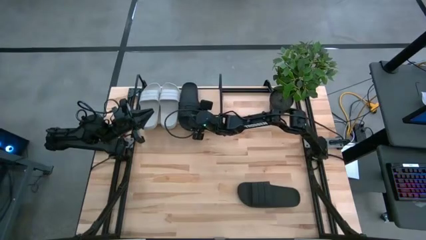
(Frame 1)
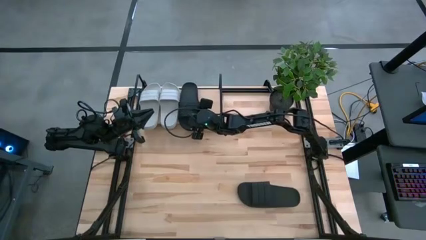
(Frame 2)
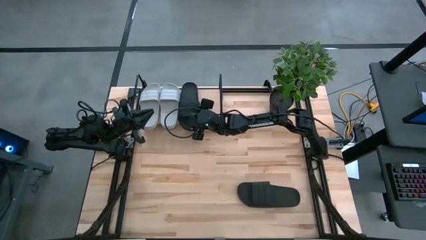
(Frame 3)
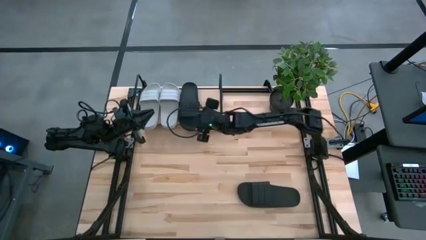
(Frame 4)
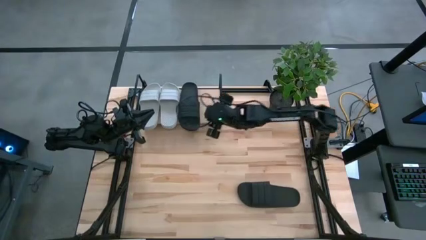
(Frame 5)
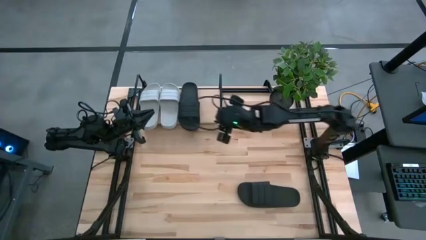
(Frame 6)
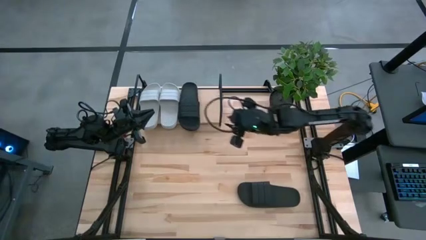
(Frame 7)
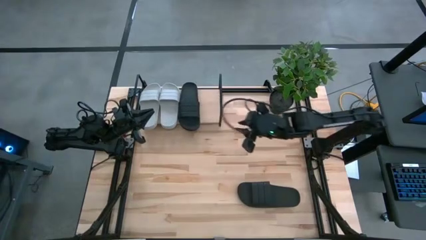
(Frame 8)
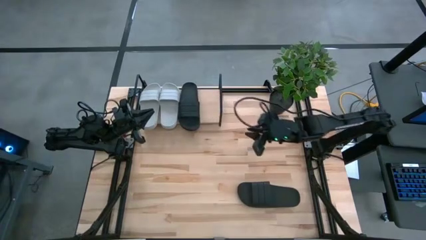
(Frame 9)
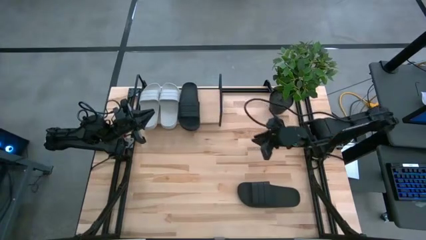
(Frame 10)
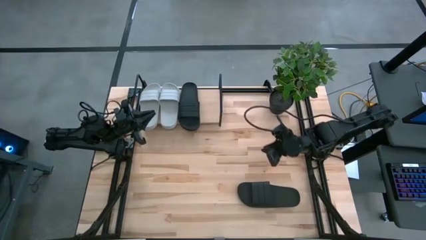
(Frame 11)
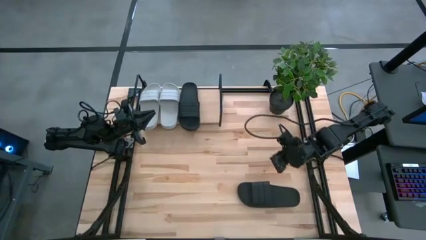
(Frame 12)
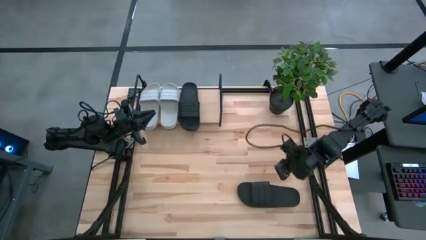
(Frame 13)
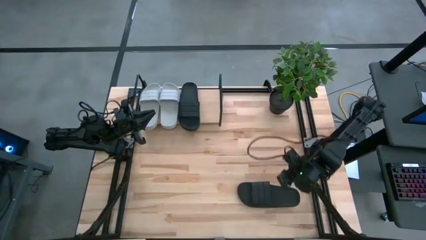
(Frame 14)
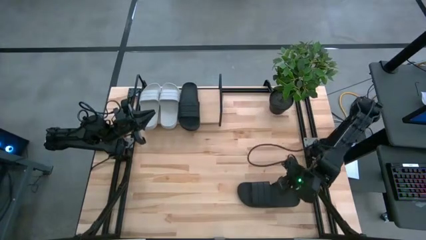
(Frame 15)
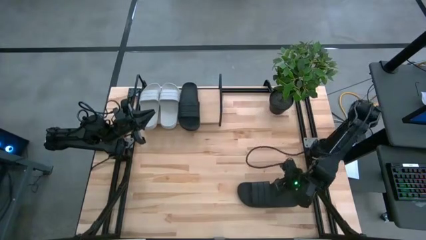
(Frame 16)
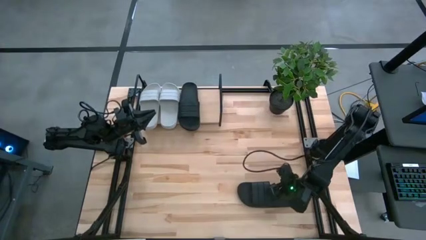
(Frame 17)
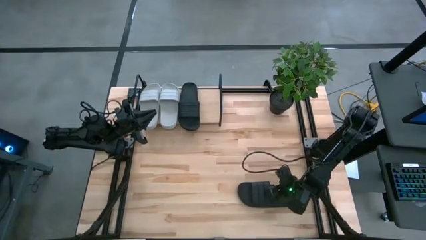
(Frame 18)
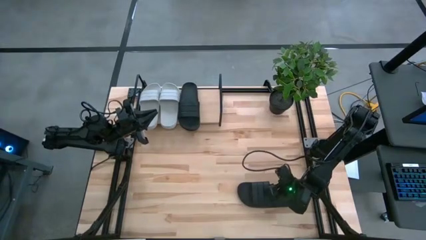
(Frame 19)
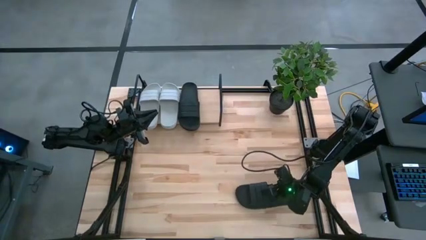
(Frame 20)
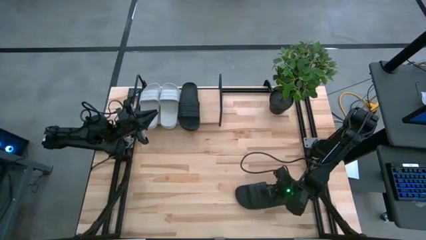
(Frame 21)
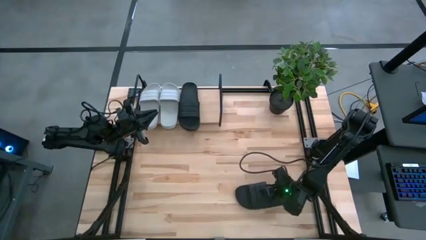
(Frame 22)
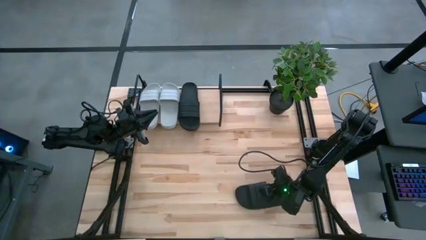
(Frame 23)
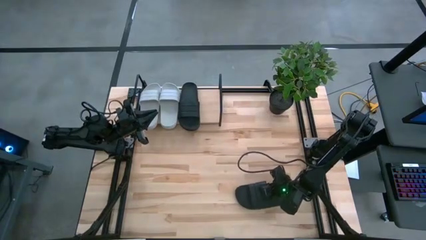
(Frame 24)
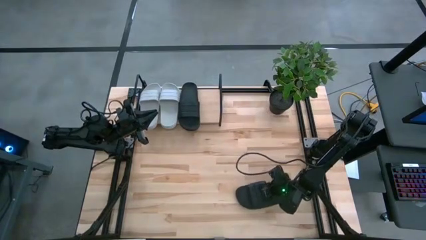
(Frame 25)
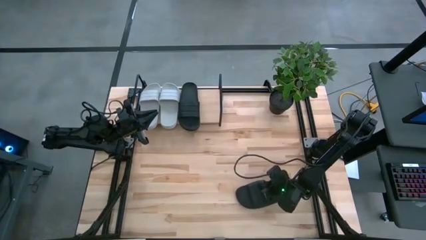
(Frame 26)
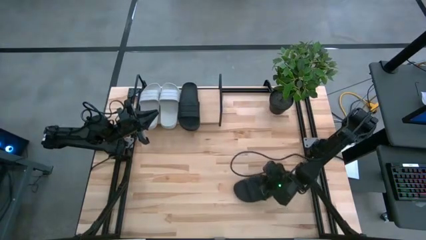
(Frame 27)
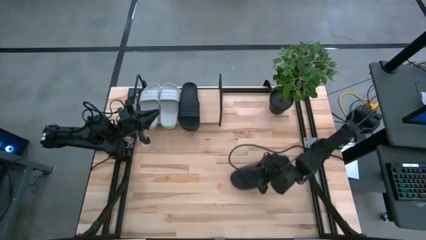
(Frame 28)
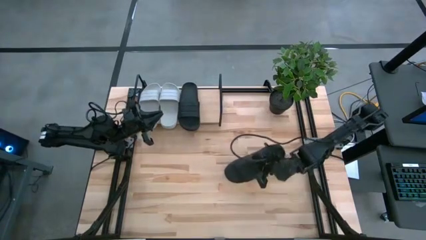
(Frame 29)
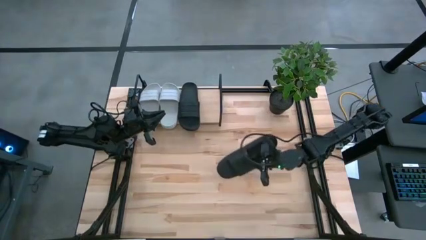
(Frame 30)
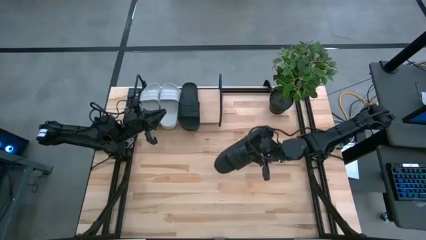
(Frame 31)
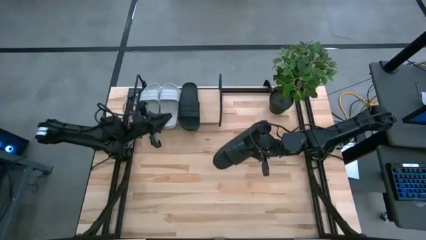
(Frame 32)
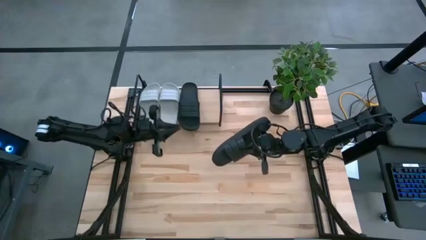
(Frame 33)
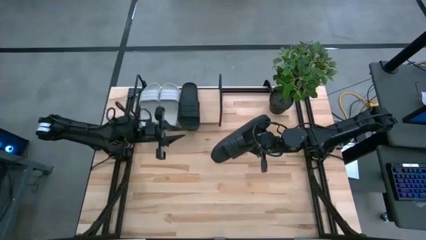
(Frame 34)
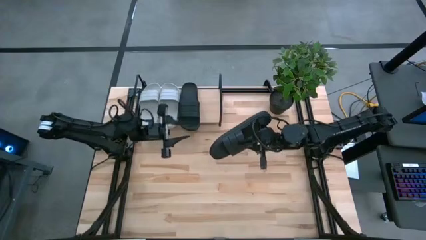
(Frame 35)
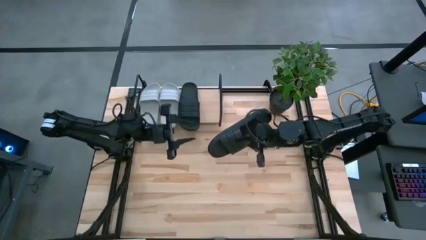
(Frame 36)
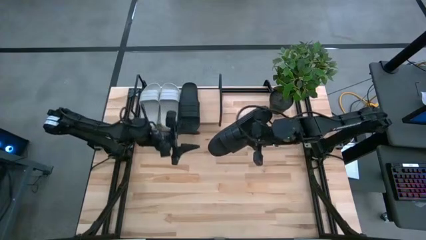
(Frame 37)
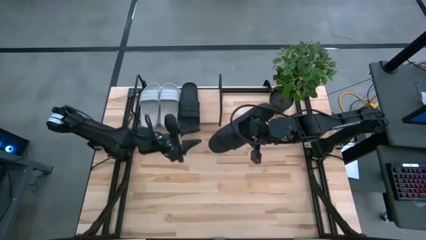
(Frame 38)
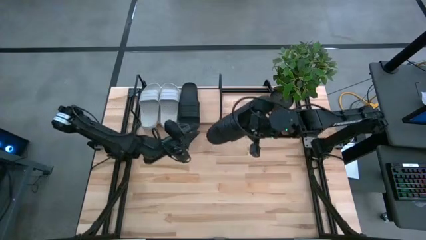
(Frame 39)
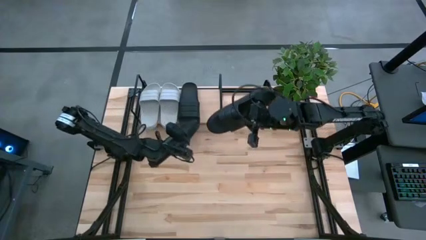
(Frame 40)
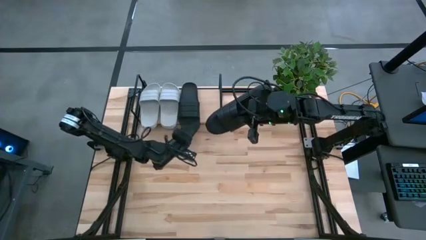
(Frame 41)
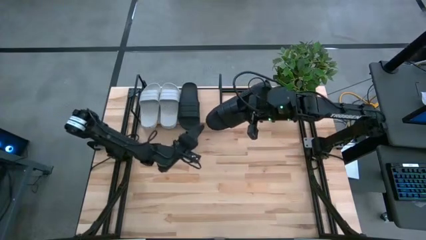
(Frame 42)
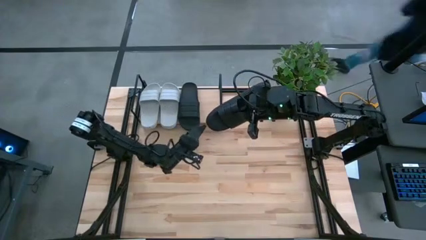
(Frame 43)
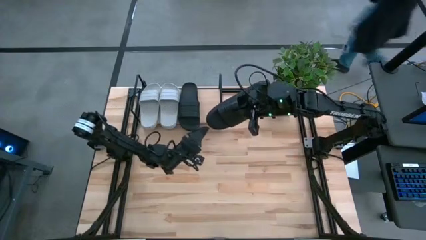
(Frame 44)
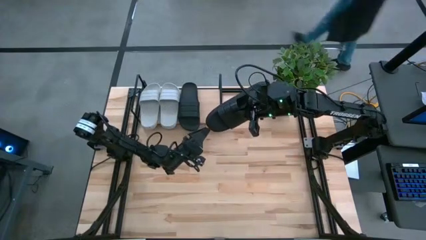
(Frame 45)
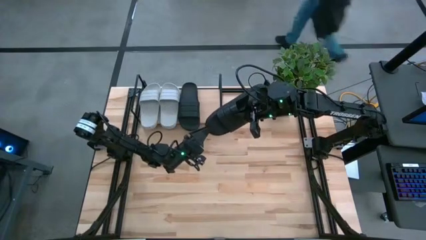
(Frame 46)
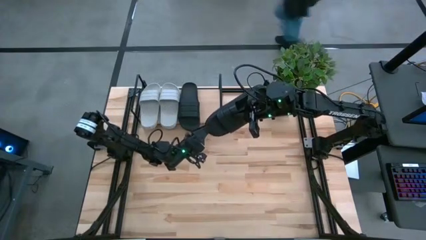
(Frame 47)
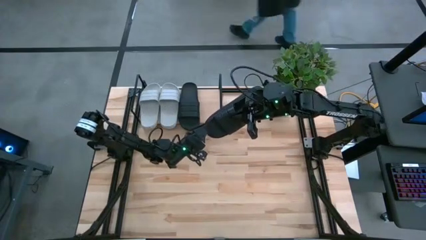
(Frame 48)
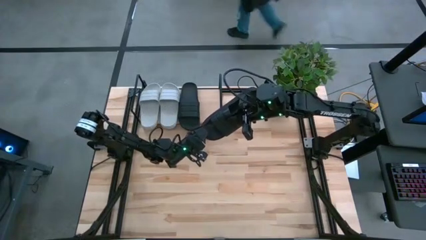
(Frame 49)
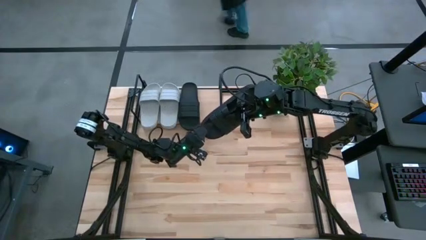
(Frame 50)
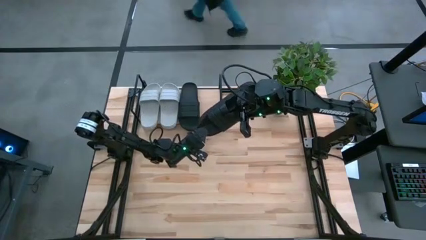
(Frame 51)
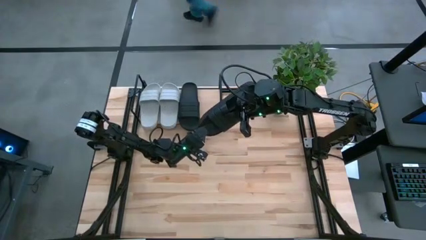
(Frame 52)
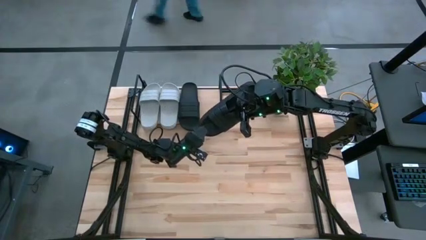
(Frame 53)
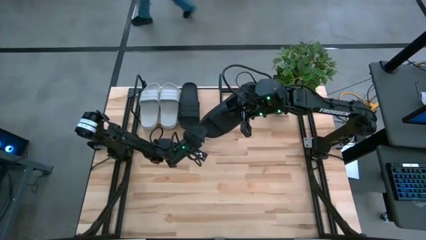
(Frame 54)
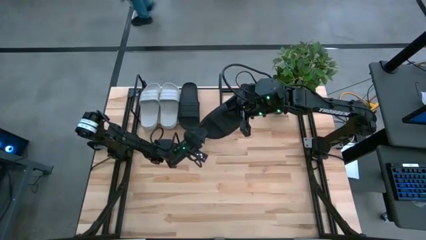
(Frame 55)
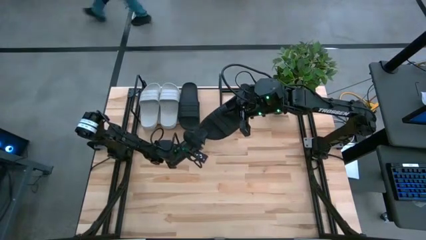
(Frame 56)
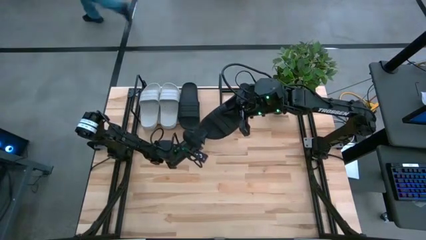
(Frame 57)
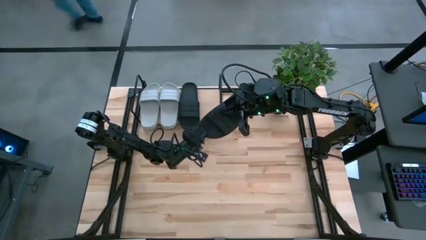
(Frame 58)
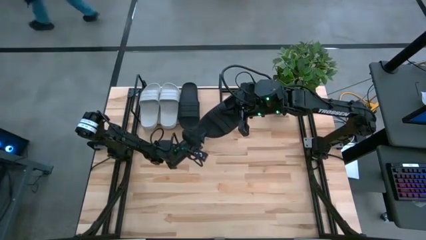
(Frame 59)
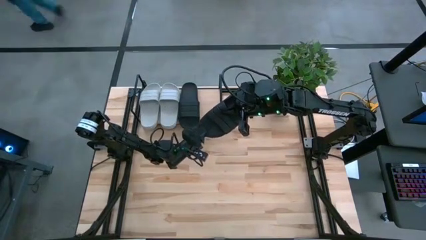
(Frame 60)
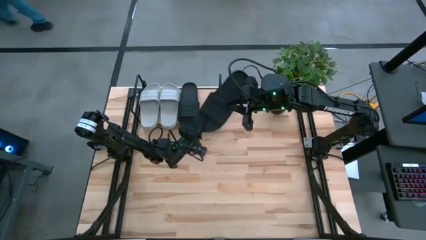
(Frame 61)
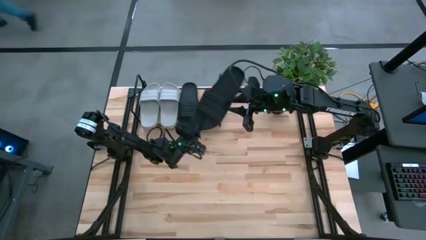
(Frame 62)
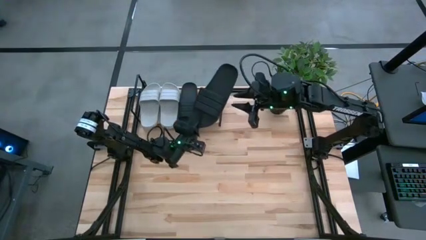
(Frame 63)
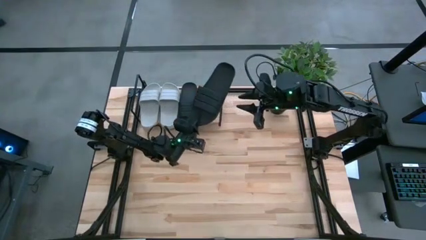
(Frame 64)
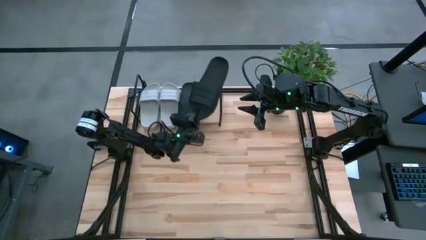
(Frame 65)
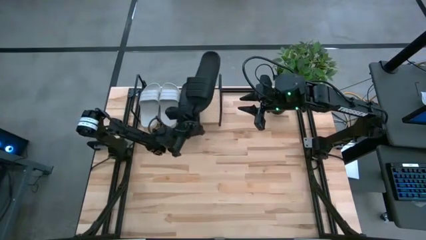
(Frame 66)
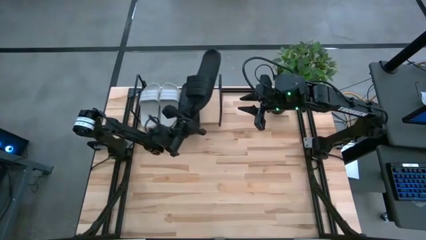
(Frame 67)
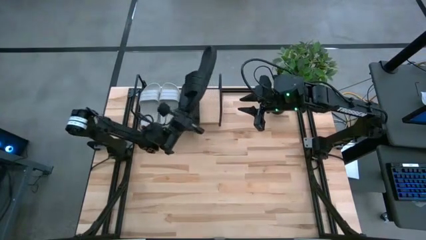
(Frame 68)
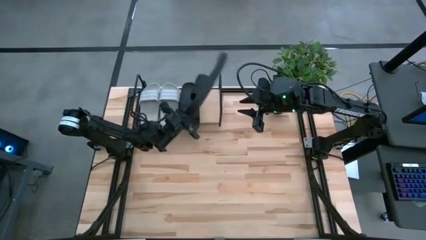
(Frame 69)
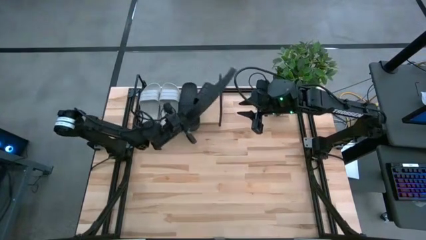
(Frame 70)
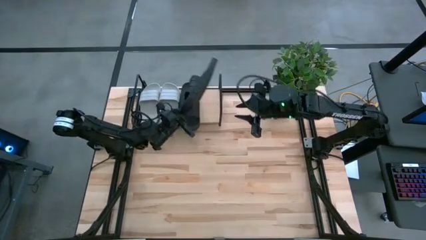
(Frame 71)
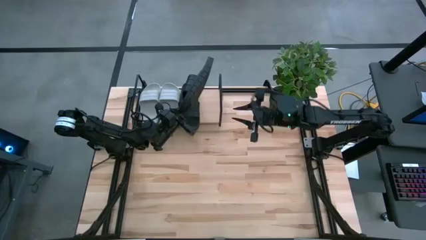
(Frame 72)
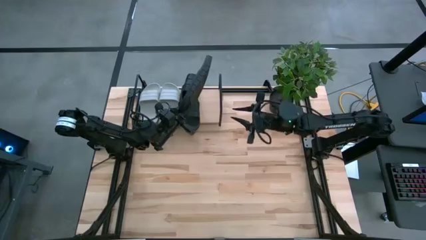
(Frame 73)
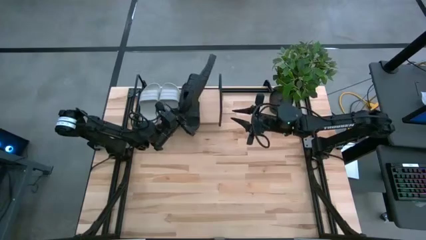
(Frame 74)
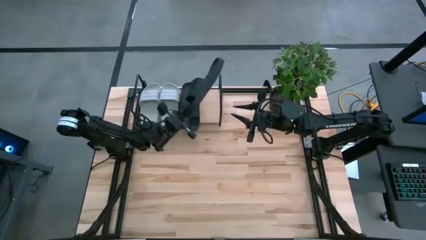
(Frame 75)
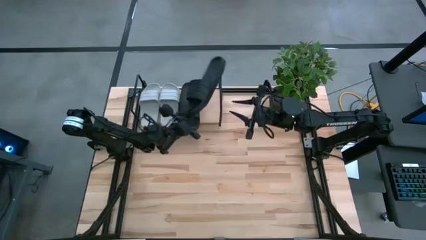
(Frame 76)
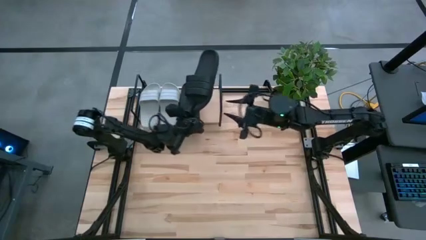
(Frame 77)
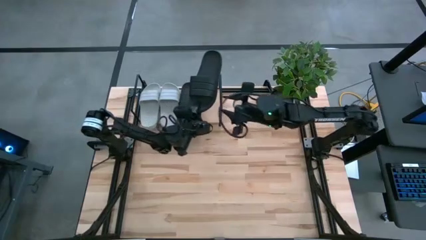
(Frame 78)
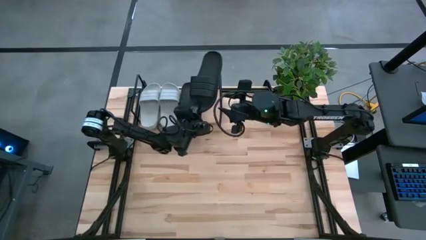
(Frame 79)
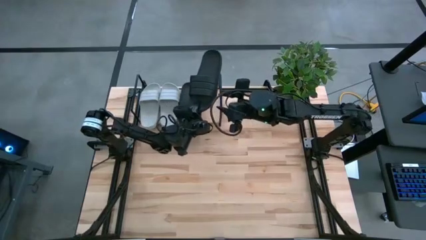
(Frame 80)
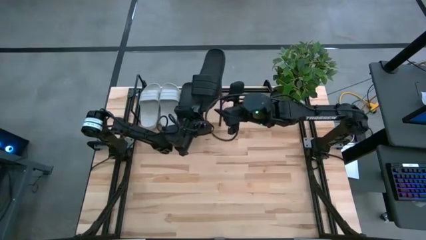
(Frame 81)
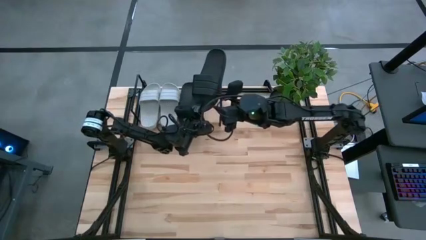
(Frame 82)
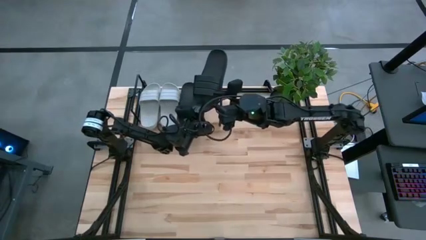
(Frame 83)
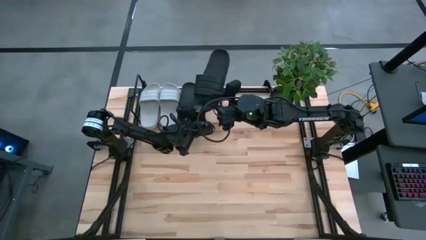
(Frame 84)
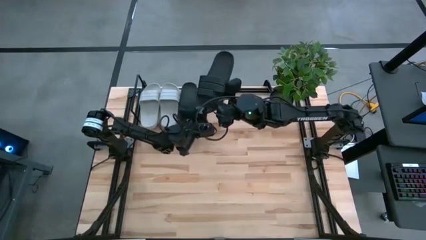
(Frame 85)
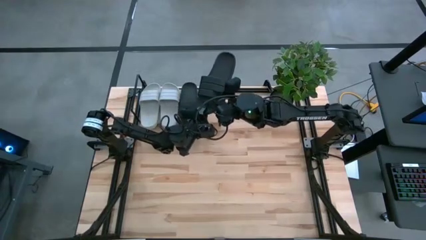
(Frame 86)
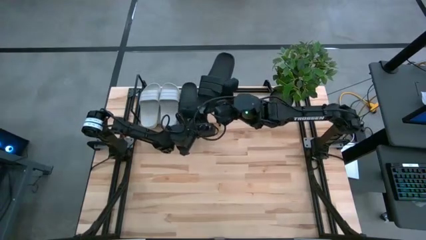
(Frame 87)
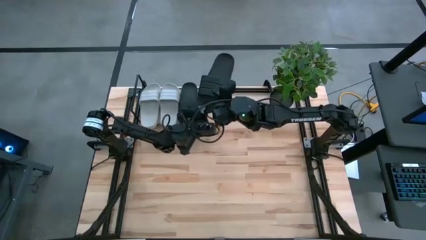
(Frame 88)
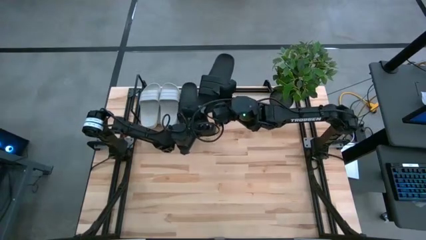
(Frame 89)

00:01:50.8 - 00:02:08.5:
Task: Pick and place slides into the shelf
Put the black slides on the shelf
